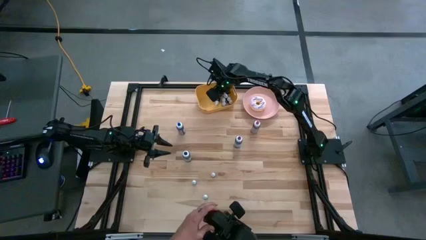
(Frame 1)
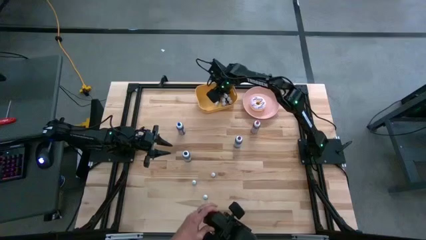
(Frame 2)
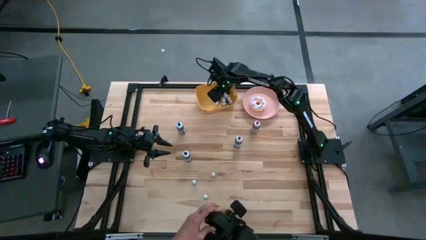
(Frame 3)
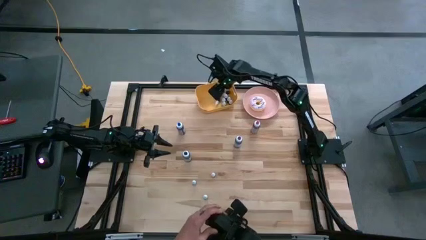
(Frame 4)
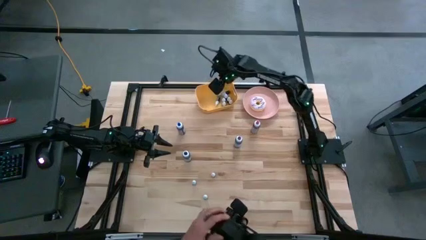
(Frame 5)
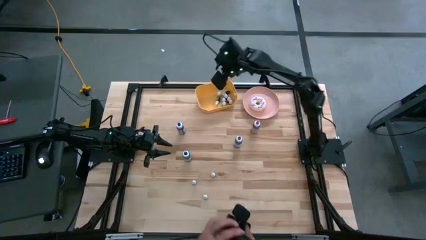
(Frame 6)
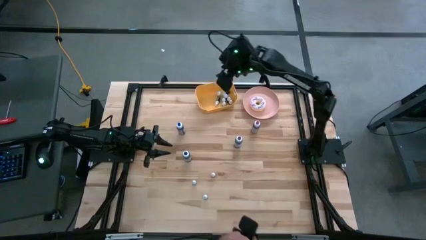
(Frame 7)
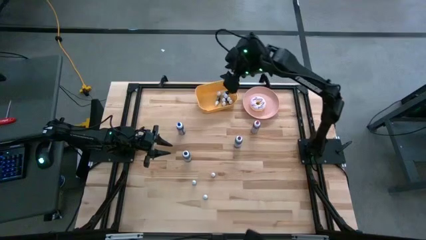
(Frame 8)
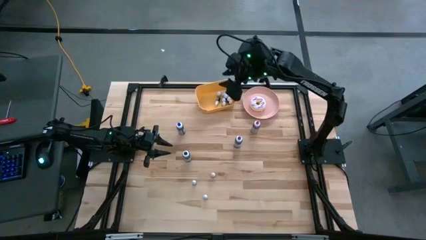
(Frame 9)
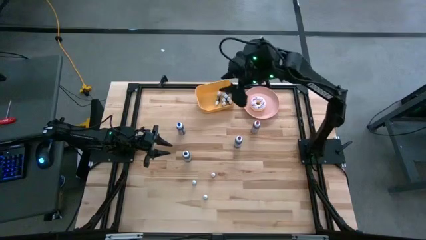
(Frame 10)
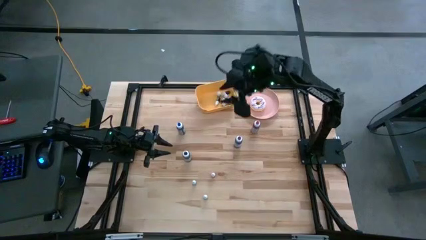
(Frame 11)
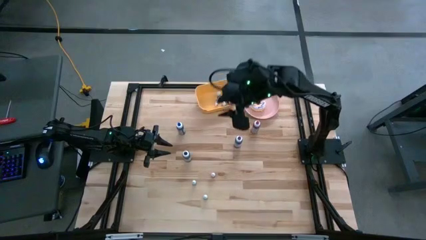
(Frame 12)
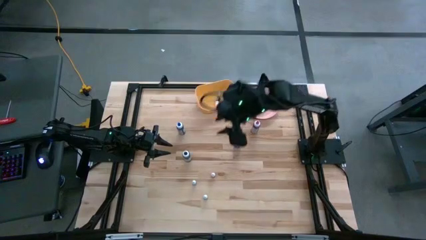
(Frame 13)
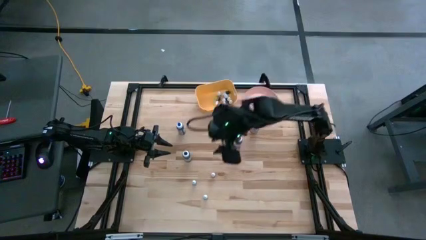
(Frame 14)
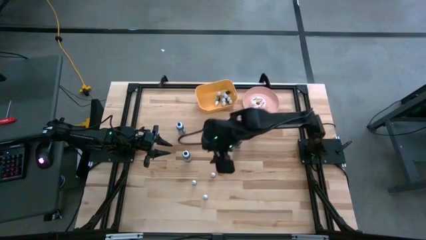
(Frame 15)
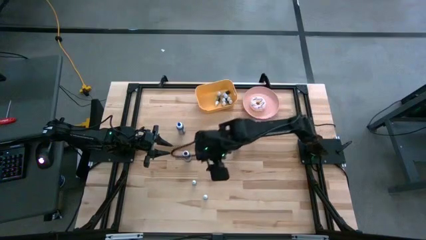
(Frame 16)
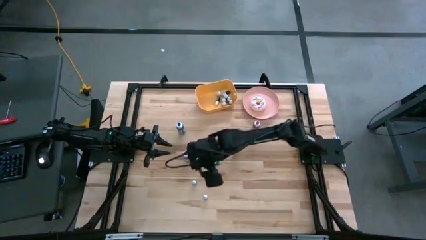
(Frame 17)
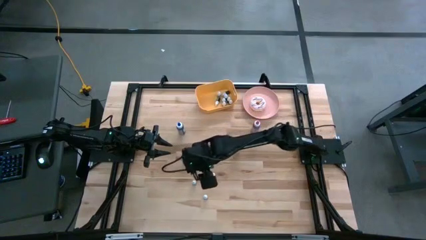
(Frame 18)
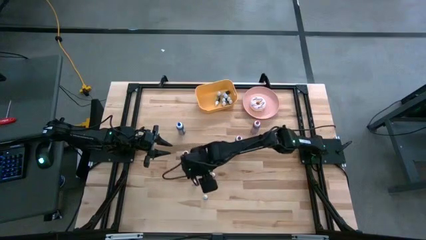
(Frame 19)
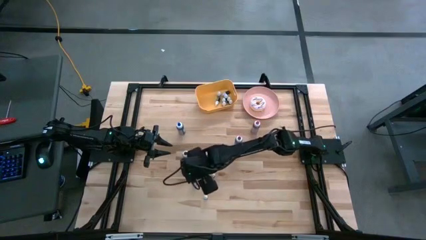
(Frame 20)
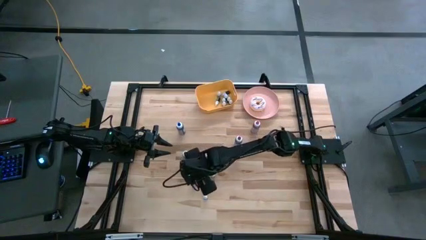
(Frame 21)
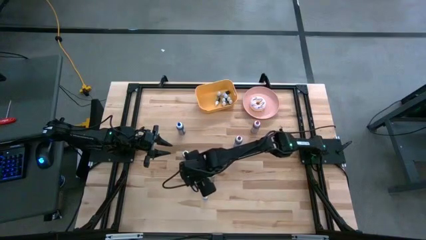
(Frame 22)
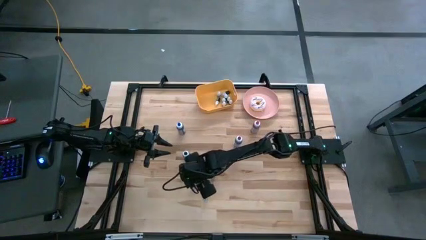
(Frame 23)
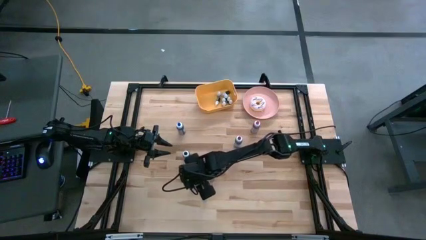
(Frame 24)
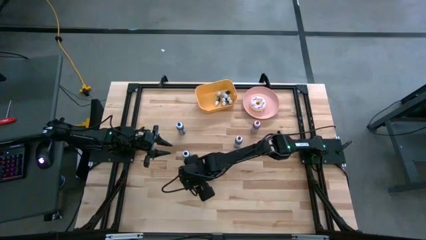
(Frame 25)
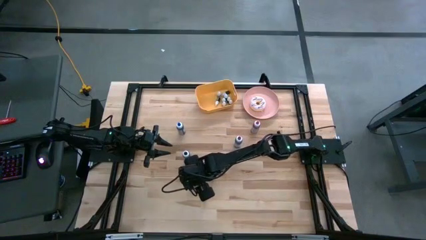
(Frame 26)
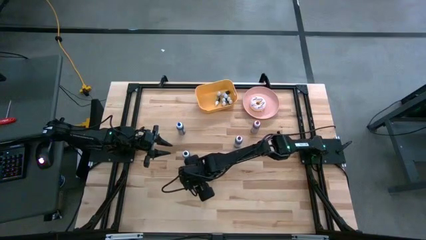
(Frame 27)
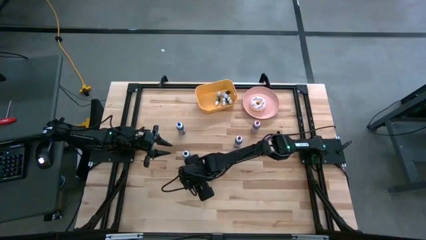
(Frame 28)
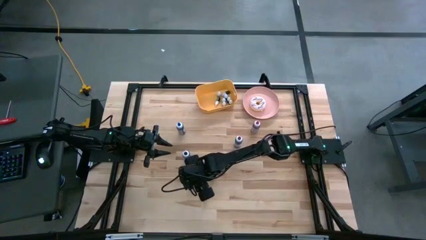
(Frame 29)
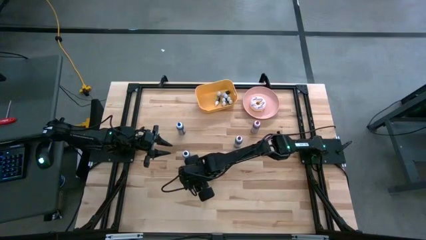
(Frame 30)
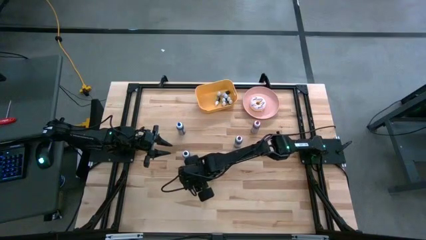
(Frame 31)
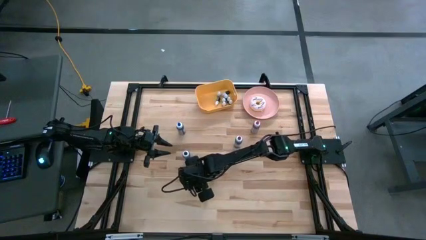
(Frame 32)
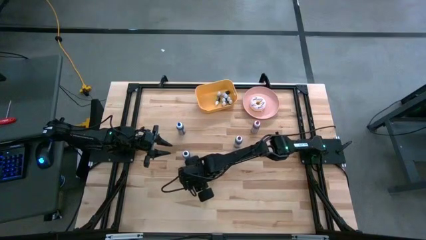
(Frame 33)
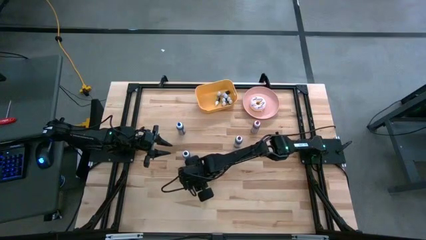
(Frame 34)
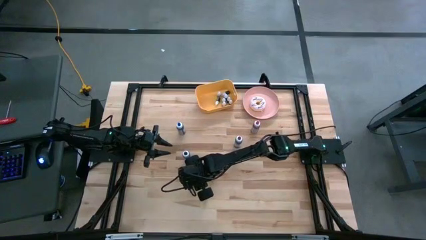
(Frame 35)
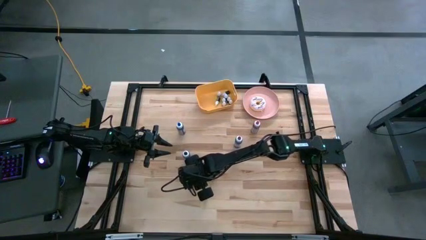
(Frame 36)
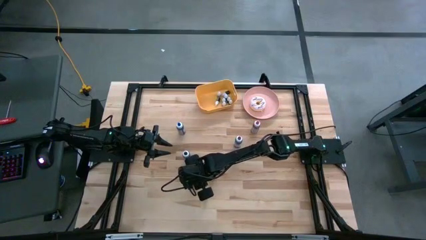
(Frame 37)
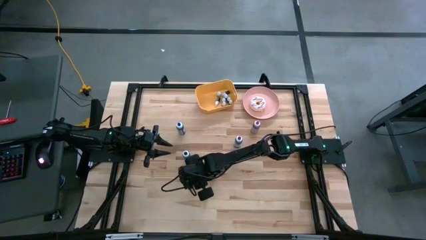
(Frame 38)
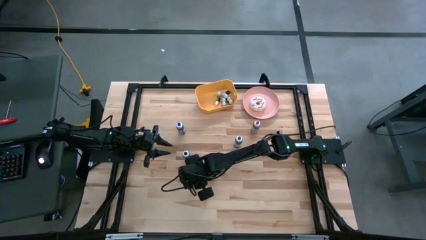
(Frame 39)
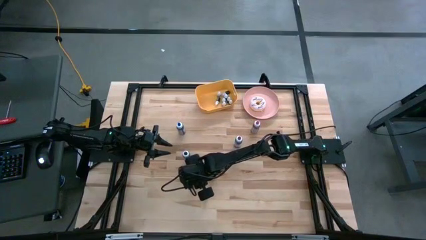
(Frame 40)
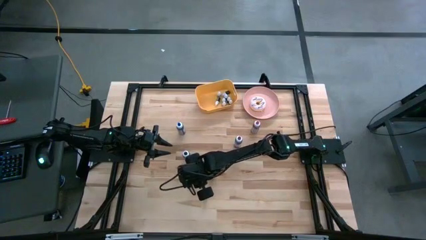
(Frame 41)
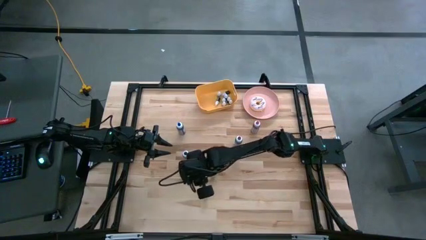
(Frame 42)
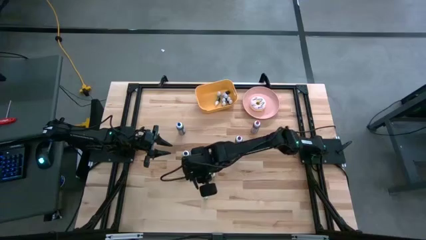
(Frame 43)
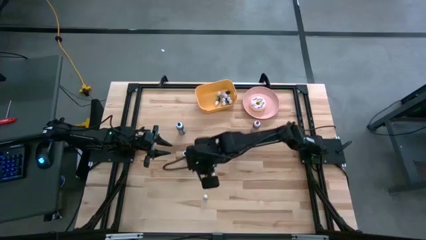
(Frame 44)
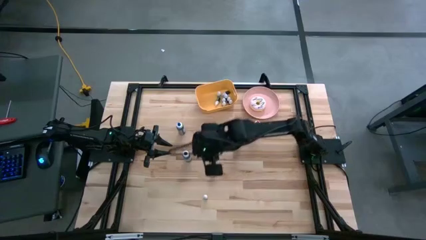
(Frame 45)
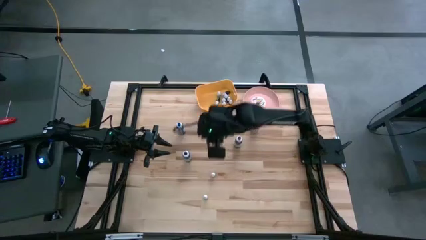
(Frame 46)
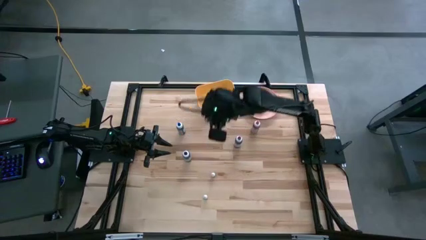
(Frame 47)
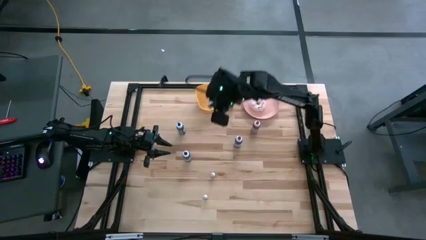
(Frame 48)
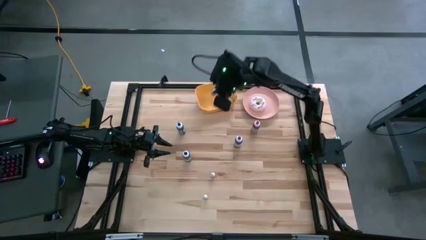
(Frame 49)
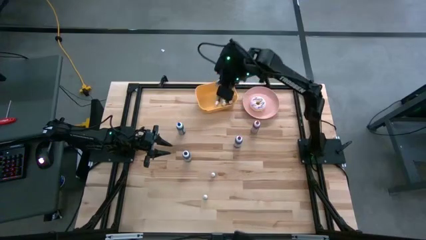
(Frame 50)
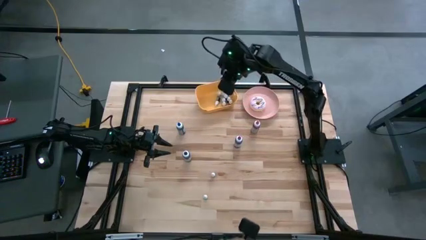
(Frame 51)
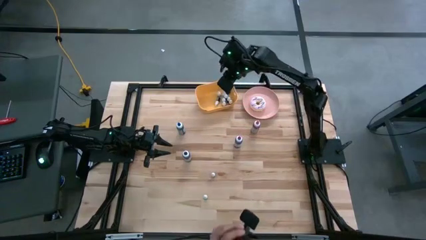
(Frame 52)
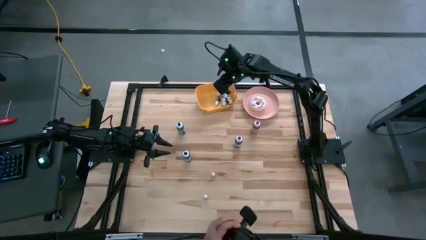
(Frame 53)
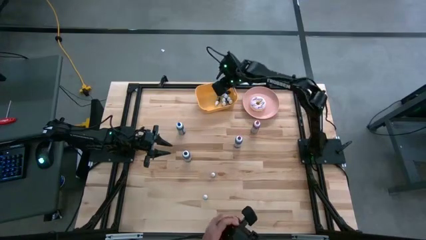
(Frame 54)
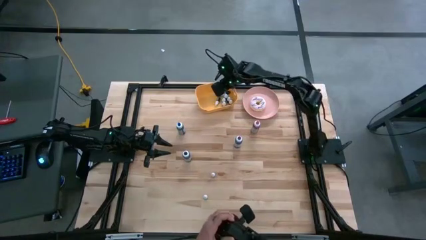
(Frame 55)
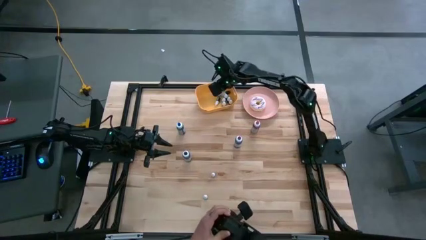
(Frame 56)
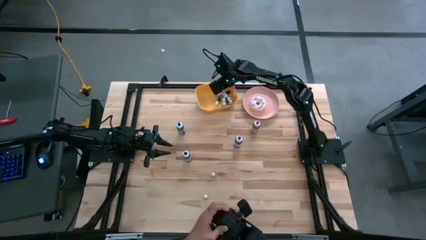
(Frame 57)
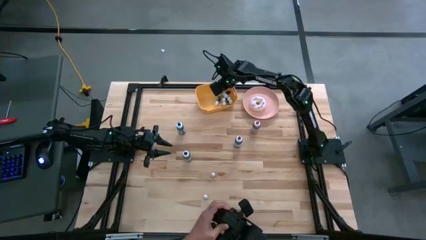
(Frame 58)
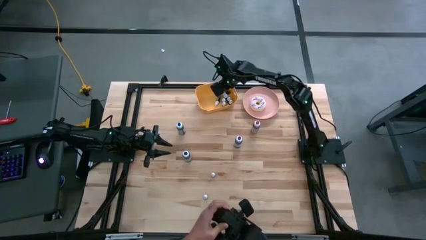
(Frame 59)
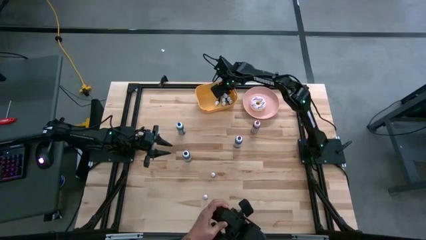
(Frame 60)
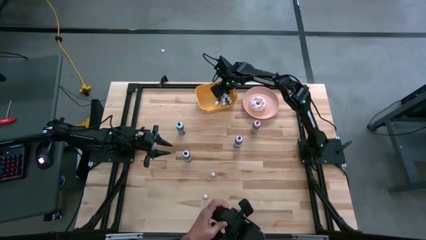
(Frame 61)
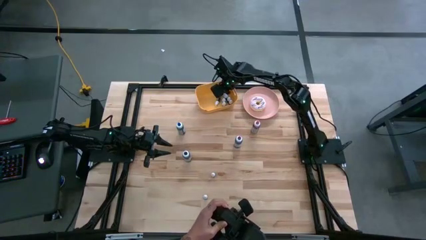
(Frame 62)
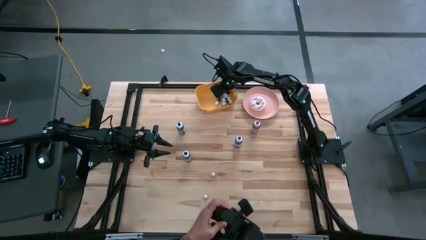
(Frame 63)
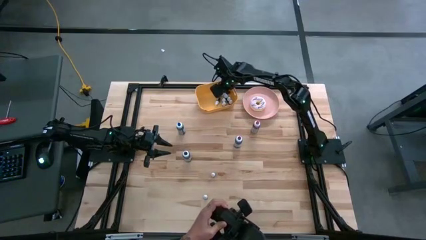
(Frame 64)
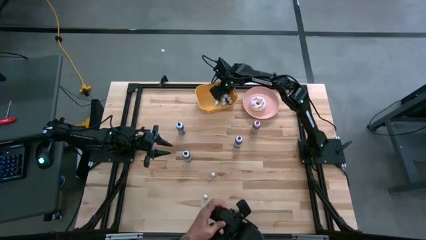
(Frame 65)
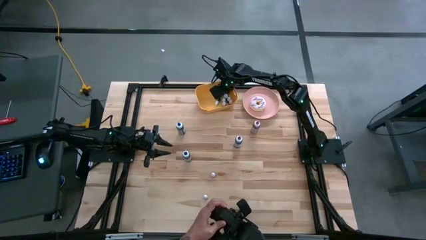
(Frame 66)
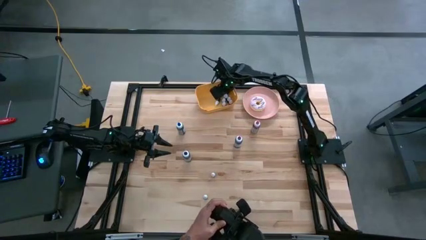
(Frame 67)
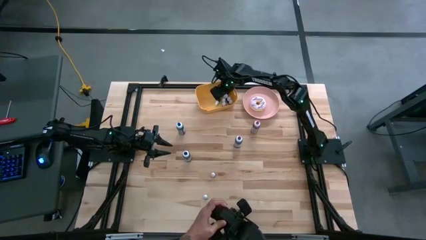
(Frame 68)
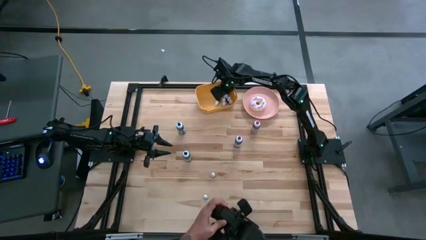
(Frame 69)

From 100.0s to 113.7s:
Task: Pick & Place food coloring
Put the small black food coloring bottle into the yellow bin

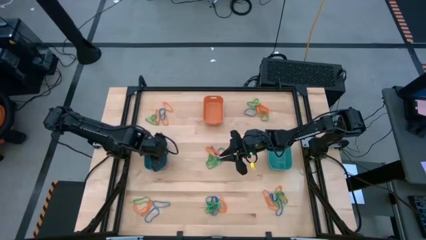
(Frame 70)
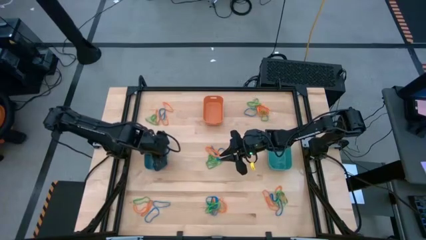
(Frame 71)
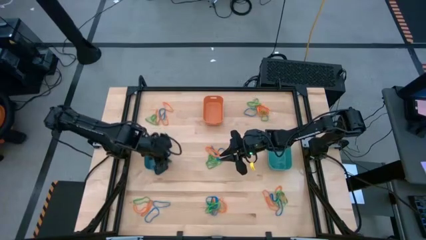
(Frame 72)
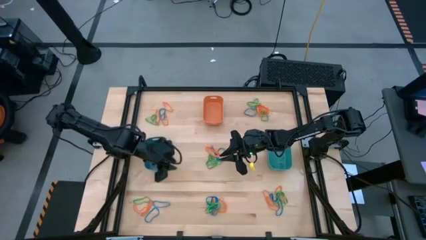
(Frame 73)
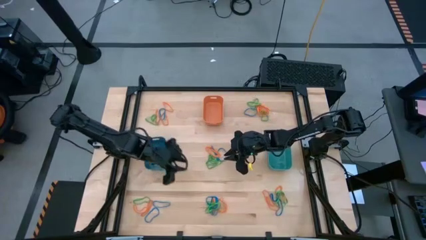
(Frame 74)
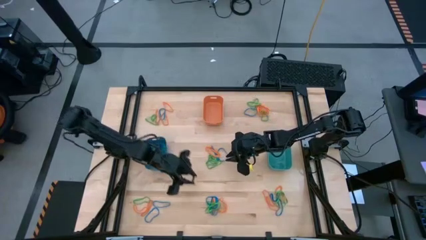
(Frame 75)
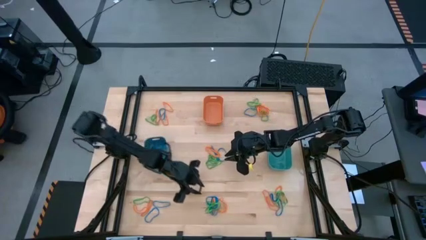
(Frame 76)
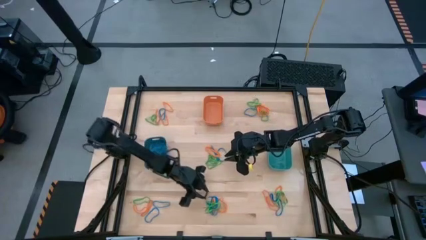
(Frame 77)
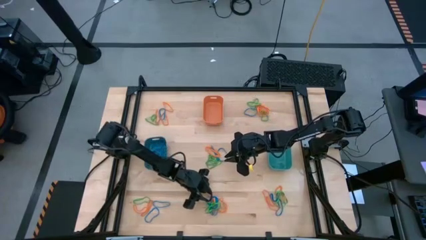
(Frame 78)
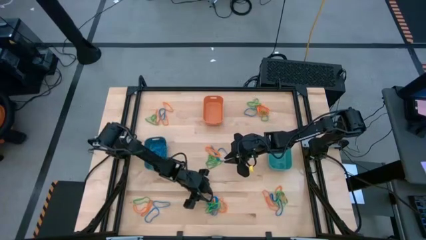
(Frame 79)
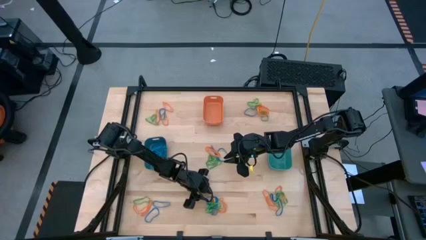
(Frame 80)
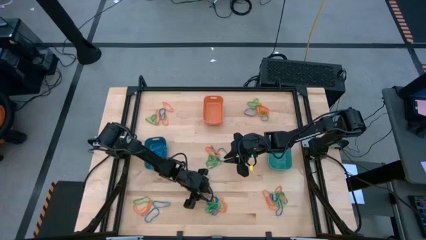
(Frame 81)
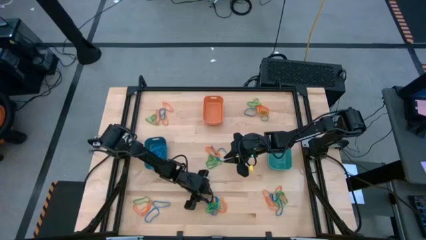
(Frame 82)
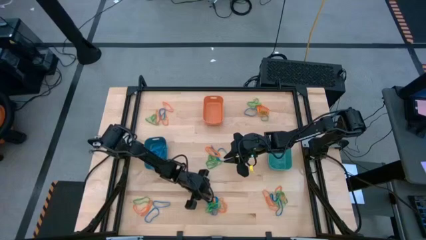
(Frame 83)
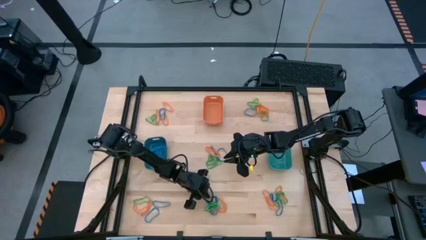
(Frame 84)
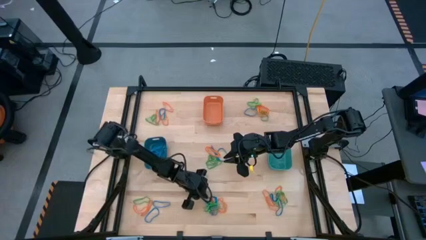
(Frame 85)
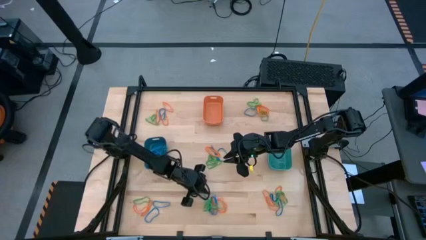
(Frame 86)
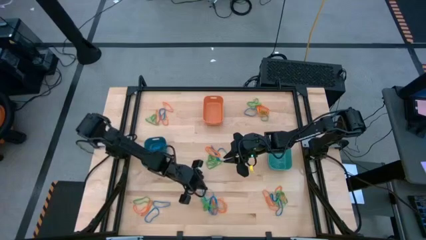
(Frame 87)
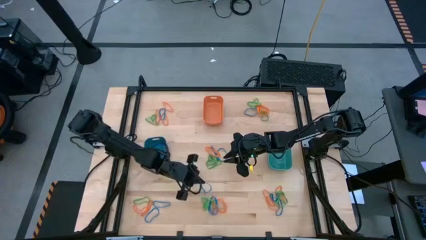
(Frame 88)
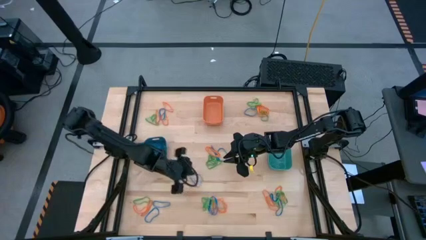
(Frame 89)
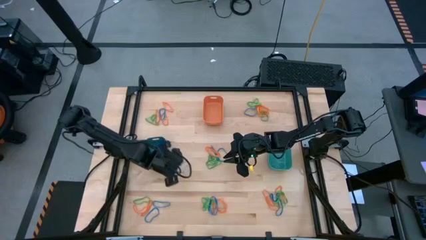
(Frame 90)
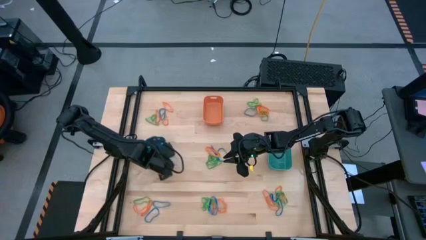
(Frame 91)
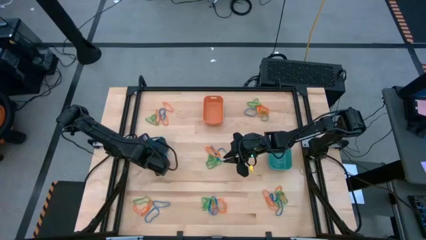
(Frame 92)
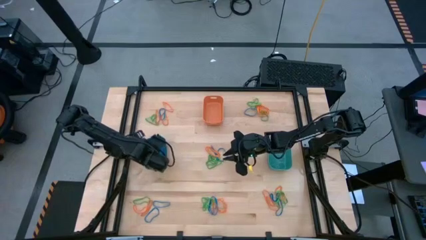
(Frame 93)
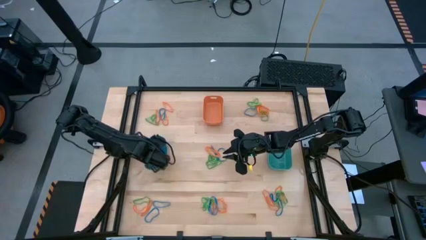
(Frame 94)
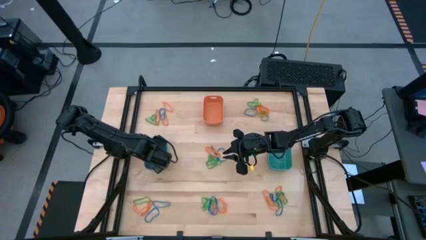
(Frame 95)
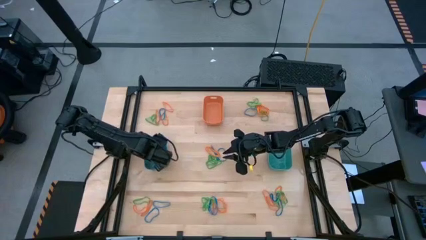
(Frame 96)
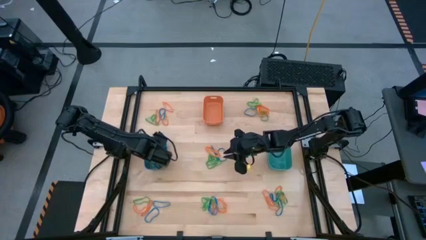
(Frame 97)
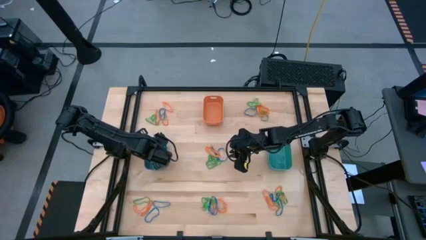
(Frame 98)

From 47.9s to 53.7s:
Task: Sort rubber bands into baskets
Put the blue rubber band into the blue bin
